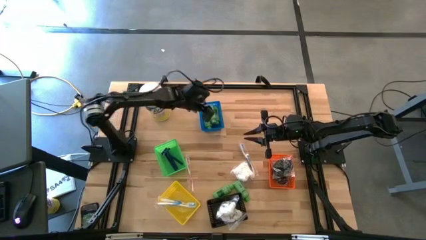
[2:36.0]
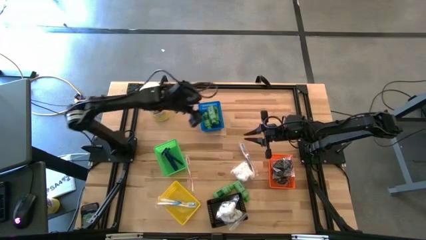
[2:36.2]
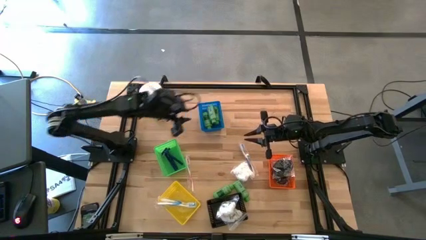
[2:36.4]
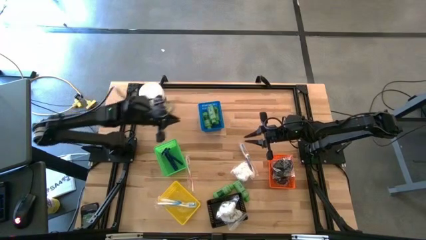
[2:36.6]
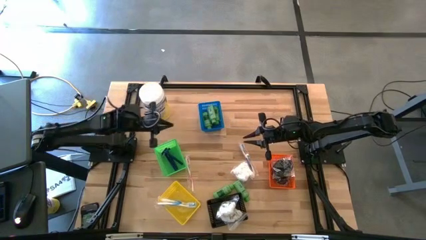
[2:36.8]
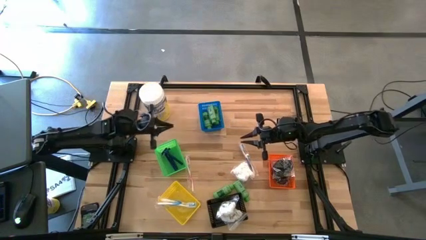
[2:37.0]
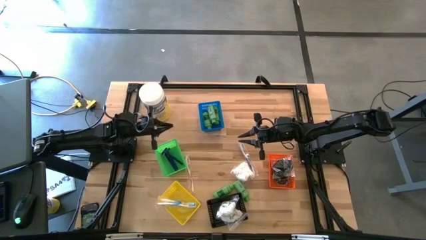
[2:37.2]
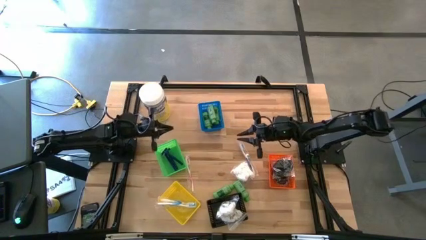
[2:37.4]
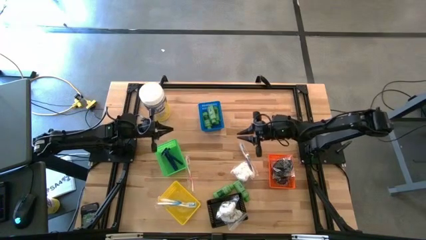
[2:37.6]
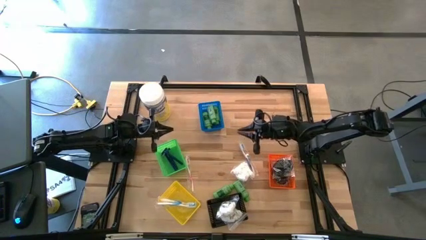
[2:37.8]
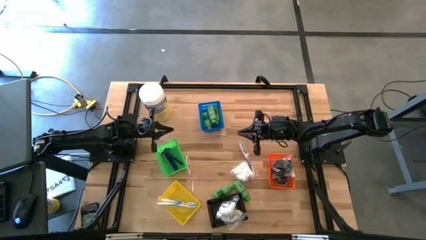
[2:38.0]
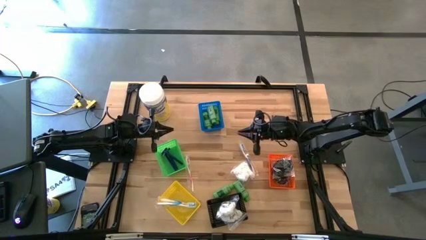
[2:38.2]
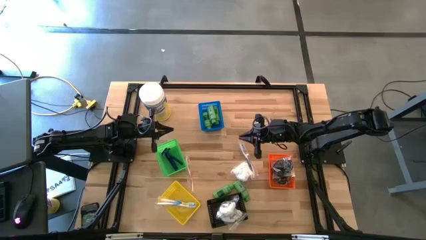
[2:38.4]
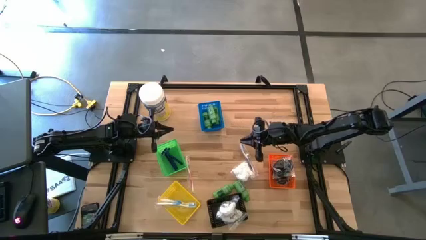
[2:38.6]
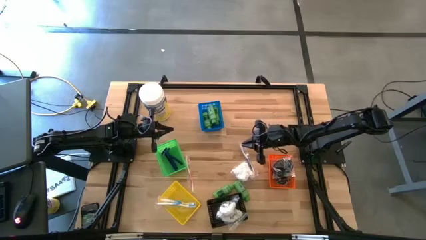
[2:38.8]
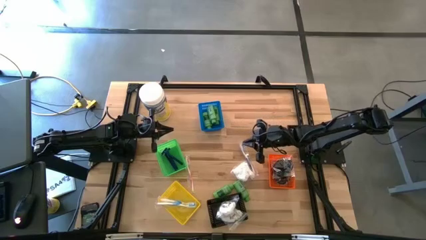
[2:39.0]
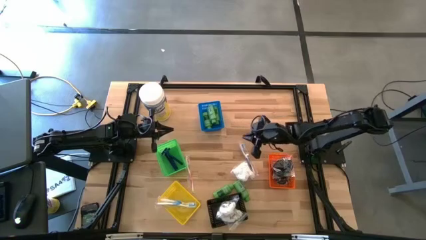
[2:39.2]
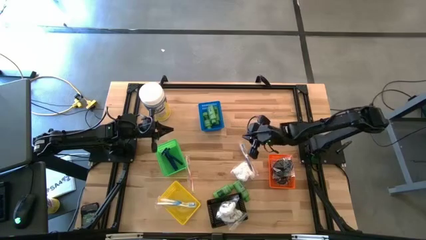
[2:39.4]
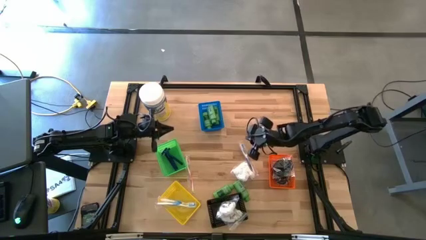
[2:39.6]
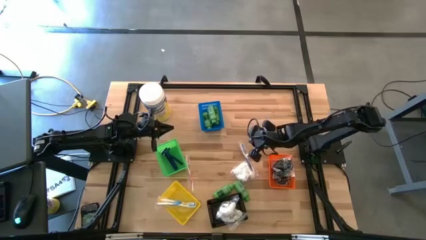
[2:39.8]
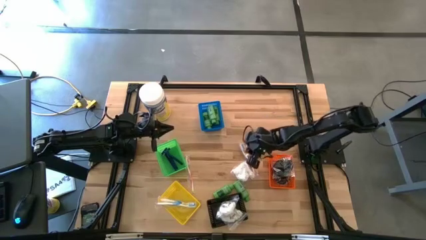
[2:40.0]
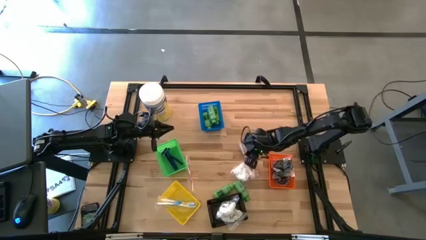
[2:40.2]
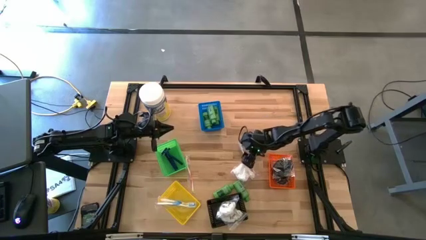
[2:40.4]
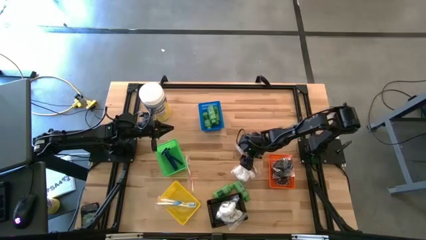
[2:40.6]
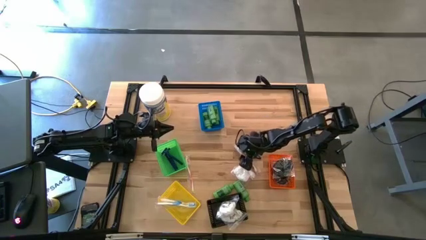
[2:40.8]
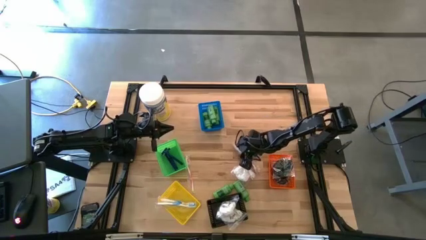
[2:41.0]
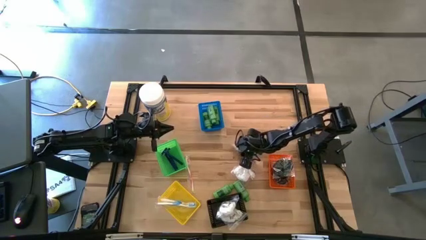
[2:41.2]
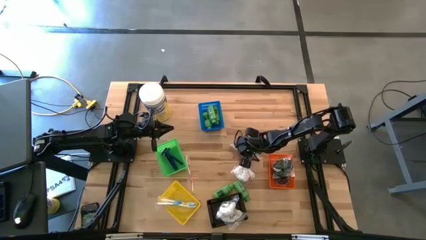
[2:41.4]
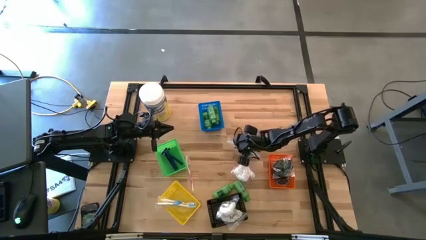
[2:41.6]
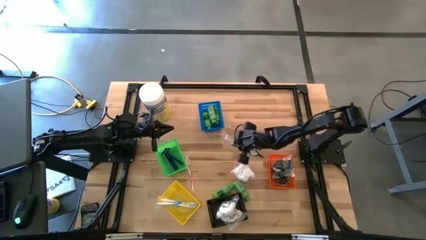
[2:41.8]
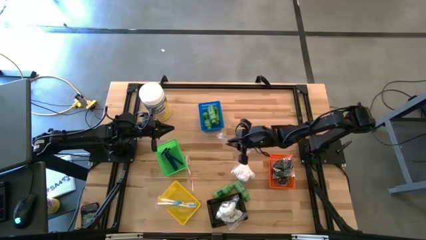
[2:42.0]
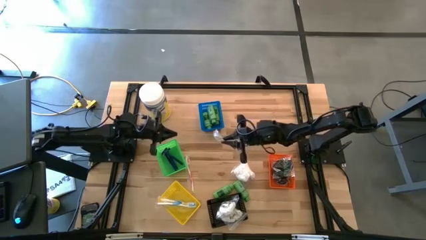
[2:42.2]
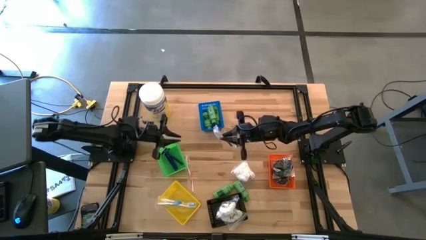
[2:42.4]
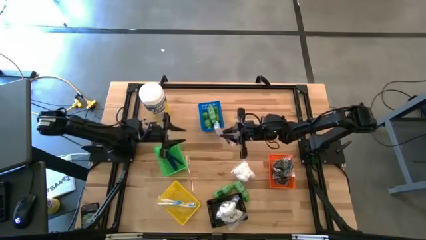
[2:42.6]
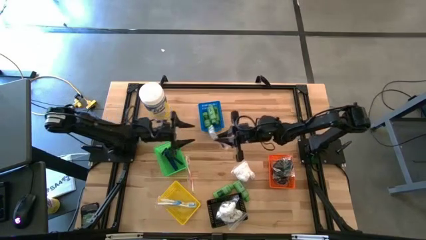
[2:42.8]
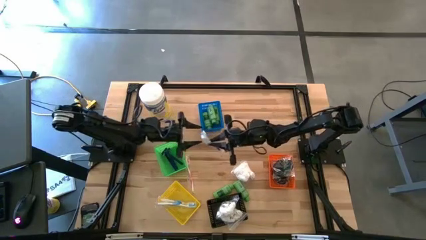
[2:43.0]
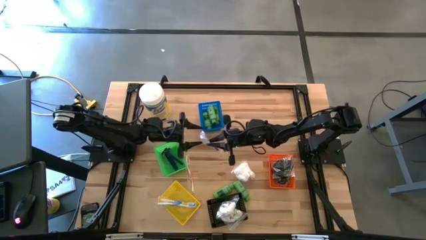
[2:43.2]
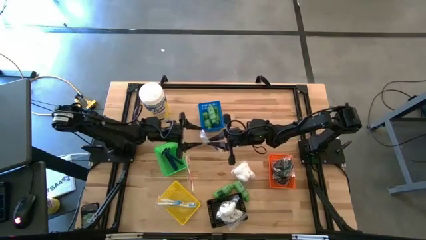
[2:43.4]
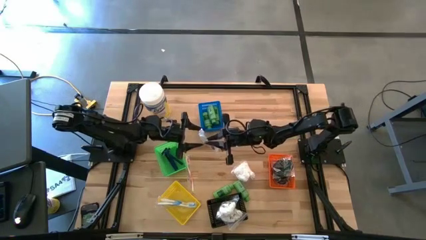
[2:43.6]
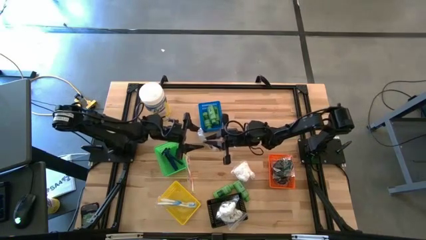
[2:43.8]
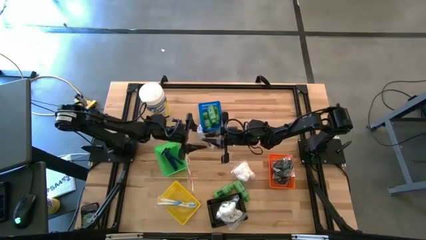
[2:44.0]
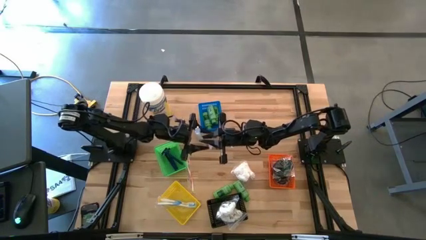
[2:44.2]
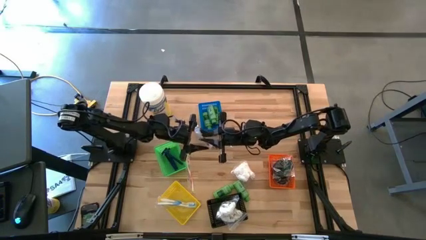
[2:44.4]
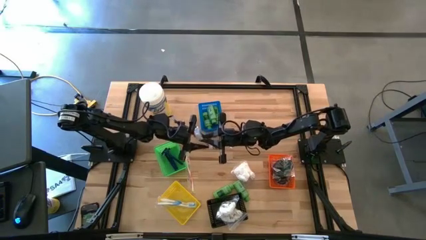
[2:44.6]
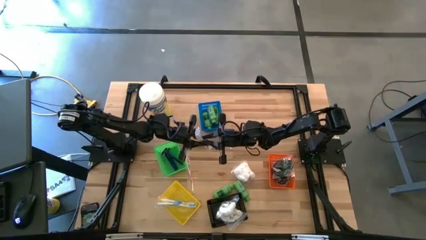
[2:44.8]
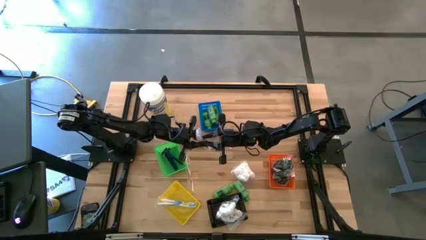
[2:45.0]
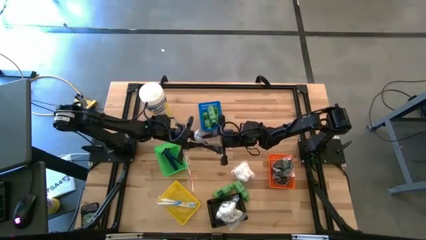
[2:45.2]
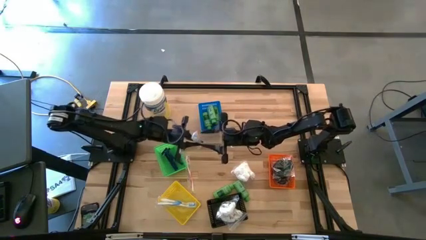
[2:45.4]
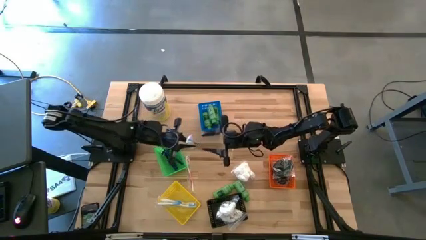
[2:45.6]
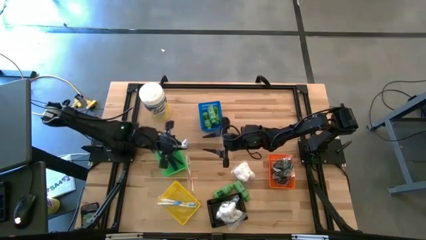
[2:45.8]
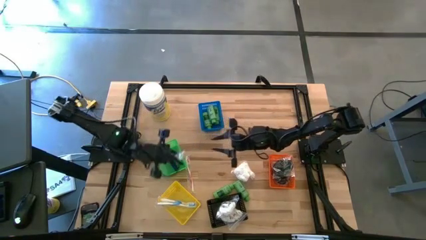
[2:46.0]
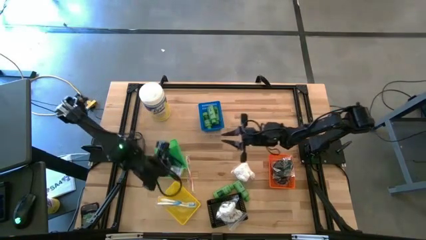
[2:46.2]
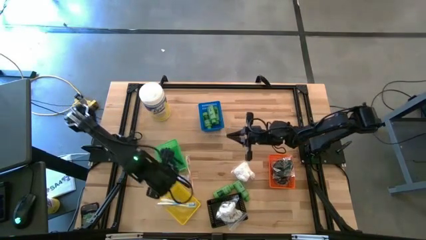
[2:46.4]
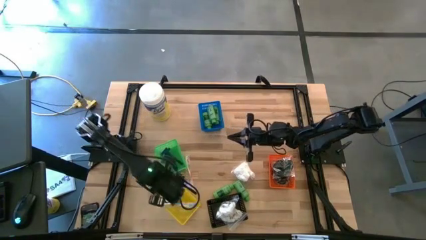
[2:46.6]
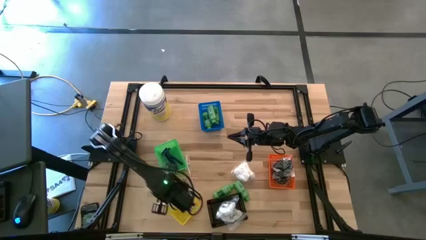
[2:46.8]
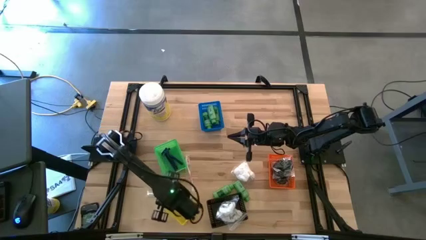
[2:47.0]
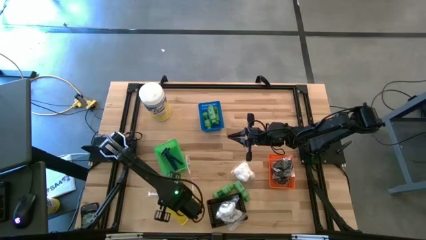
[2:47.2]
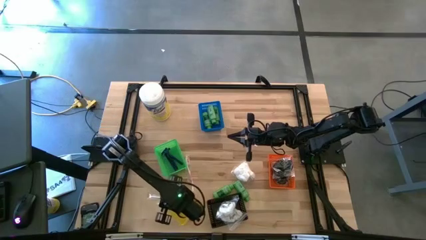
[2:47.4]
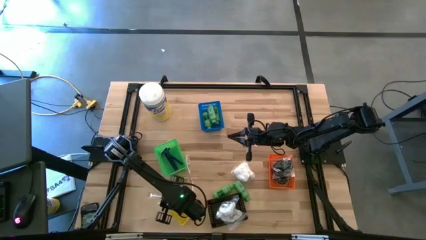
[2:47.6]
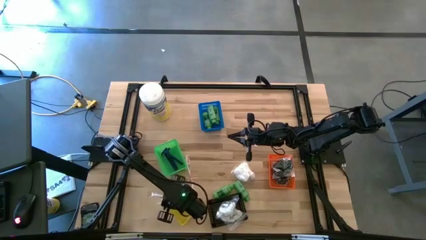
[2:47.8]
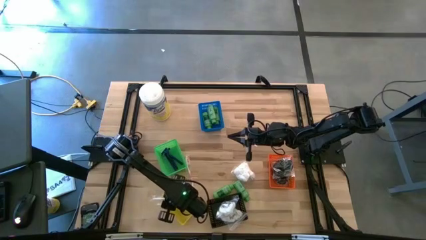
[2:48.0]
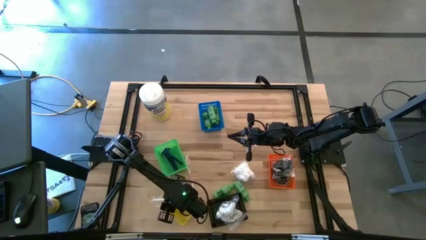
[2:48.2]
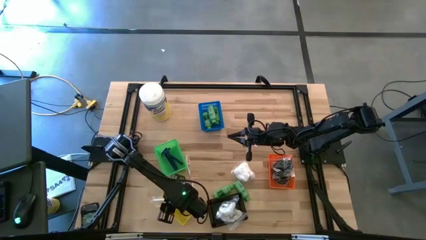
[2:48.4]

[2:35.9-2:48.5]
Task: Pick & Place Travel size toiletries
Put the blue toothbrush into the yellow bin

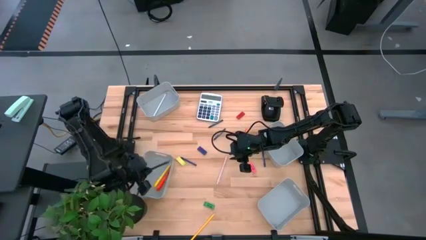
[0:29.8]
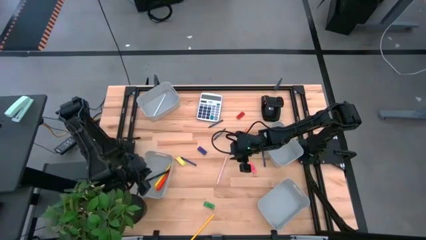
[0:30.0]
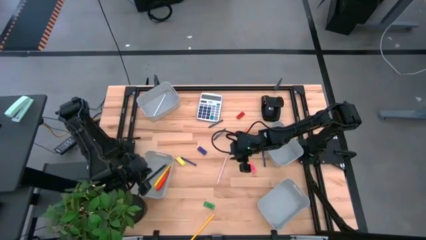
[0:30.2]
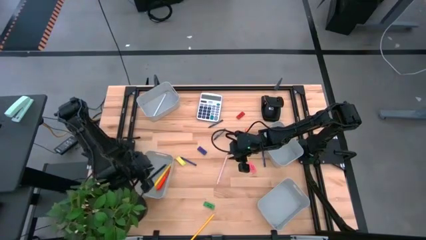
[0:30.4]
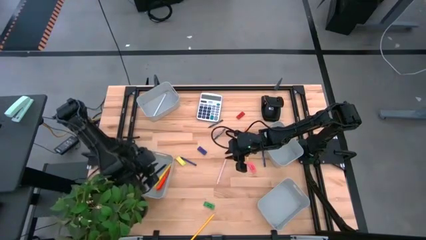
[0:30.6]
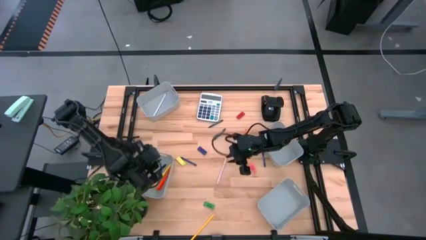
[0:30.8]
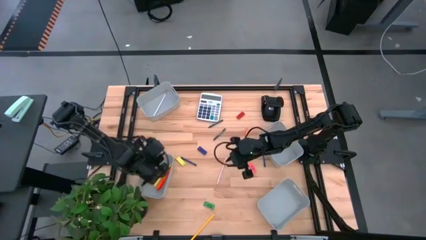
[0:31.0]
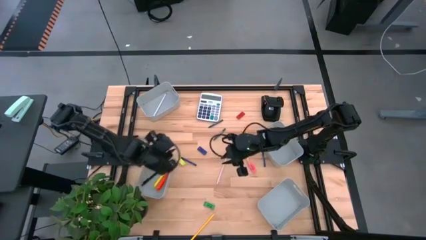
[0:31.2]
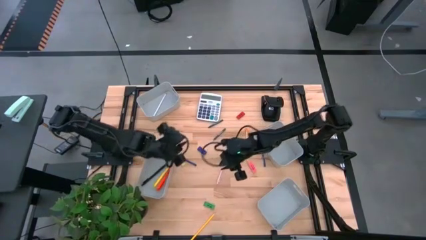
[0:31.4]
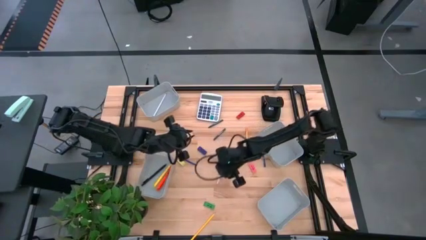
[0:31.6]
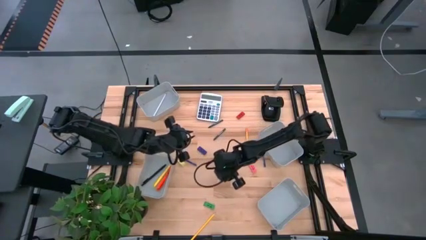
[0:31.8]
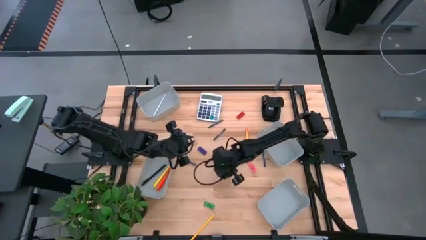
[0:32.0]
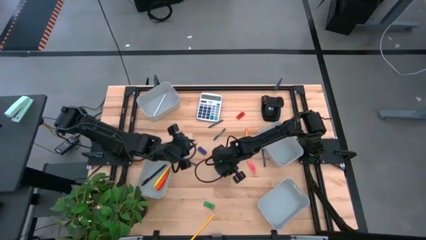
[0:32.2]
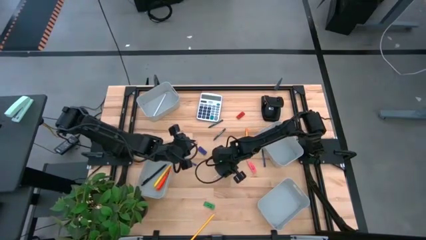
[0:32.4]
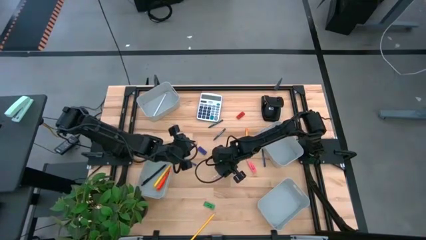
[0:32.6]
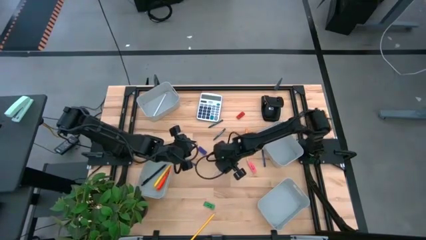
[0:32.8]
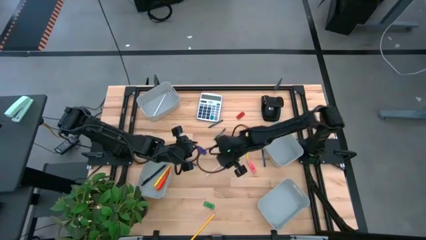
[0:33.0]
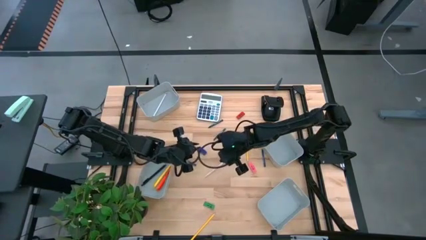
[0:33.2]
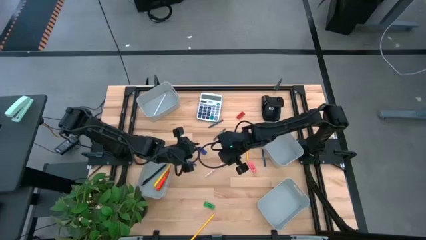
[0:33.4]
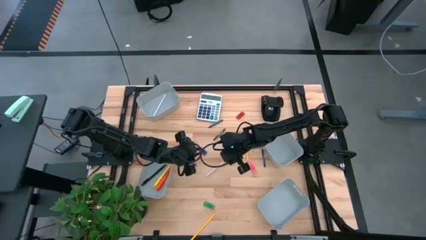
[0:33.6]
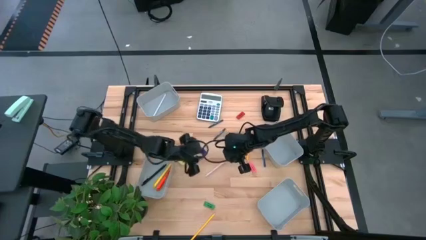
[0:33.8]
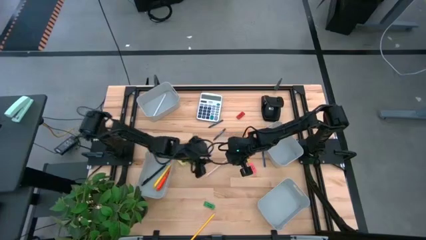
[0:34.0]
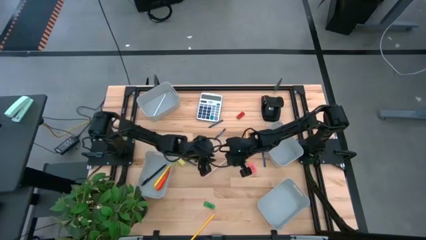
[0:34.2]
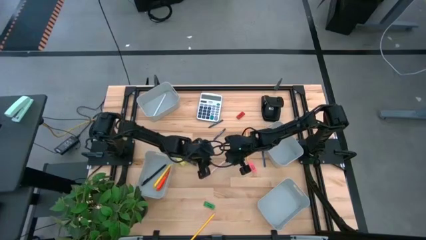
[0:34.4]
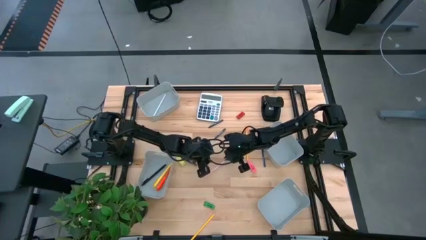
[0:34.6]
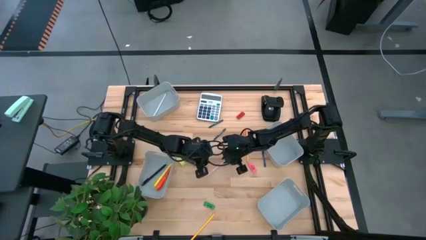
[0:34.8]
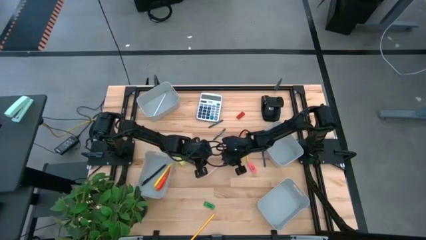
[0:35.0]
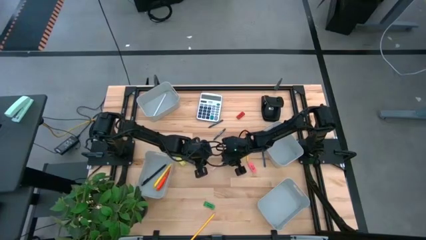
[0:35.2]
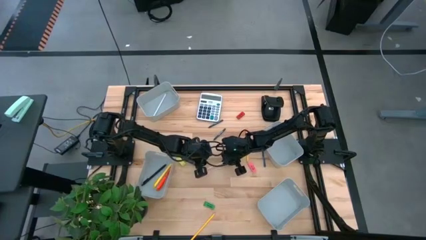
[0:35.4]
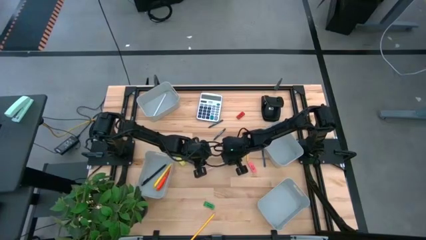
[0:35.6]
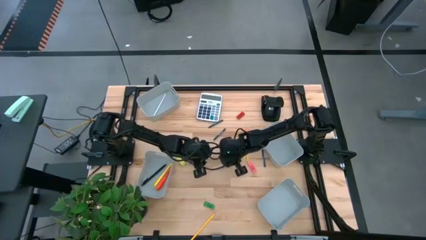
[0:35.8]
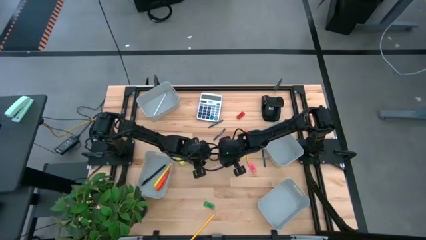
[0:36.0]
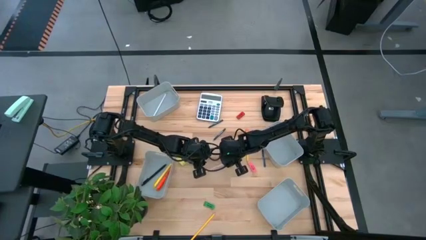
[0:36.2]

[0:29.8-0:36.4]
Task: Sort crayons/erasers/pens/pencils in bins
Put the light pink ballpen into the bottom left gray bin
